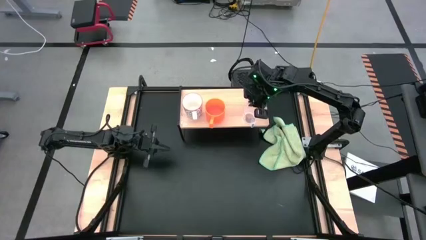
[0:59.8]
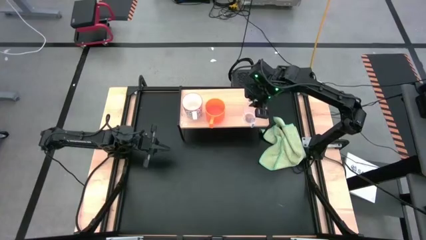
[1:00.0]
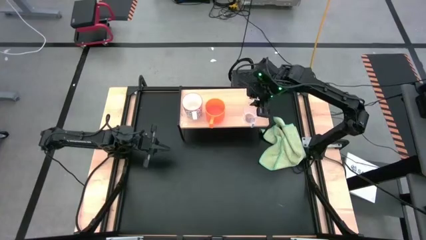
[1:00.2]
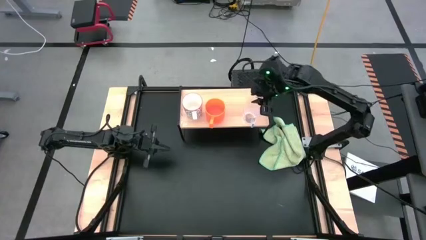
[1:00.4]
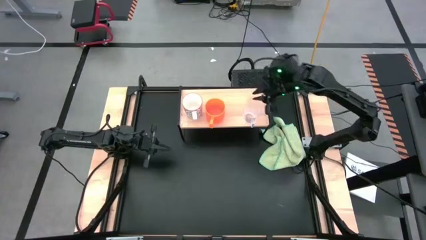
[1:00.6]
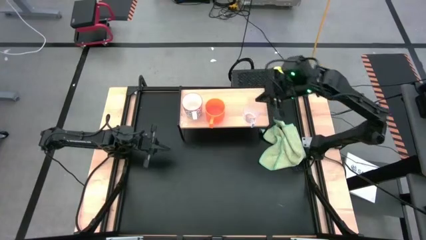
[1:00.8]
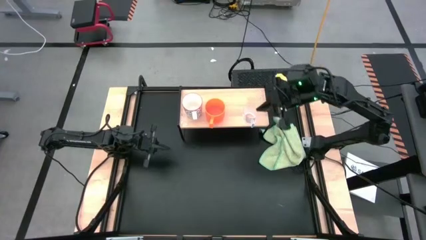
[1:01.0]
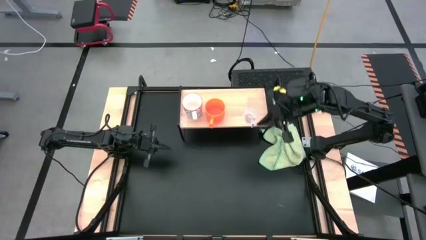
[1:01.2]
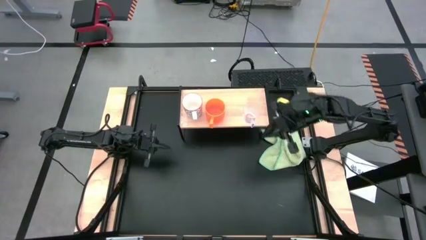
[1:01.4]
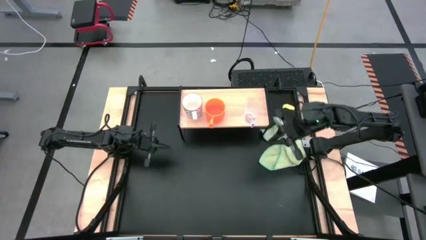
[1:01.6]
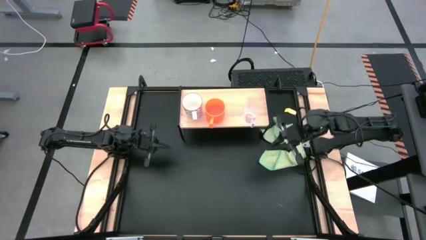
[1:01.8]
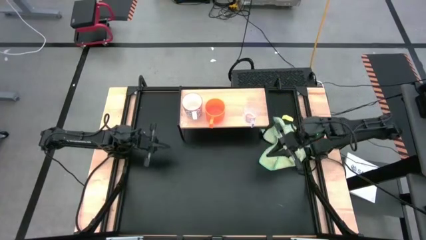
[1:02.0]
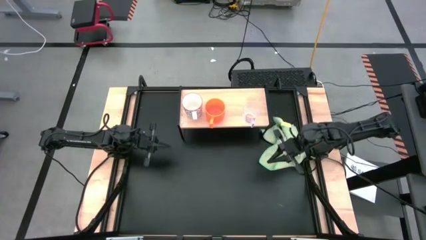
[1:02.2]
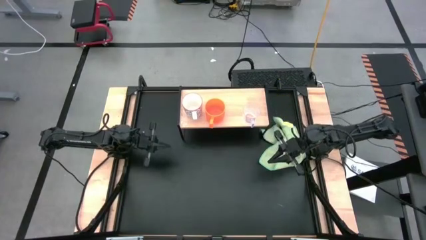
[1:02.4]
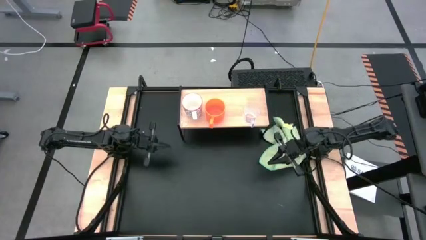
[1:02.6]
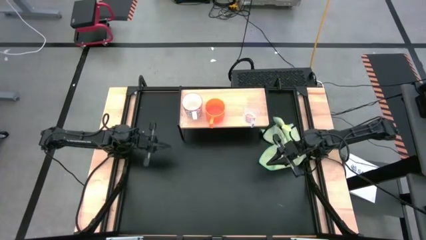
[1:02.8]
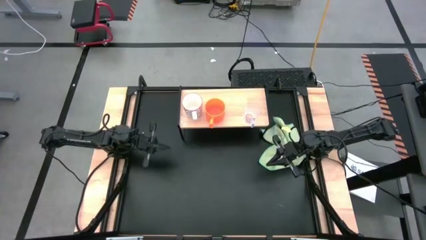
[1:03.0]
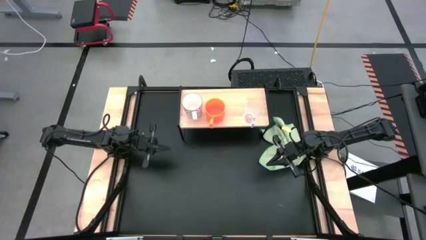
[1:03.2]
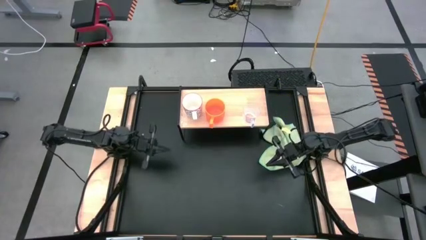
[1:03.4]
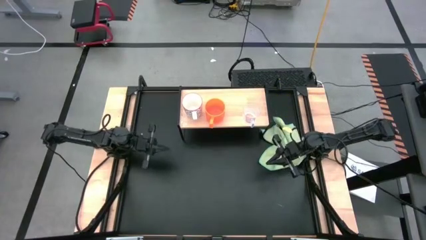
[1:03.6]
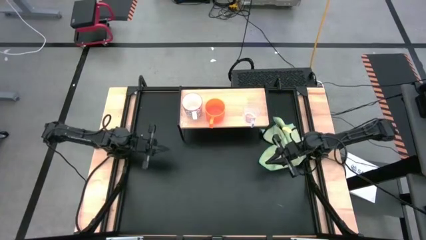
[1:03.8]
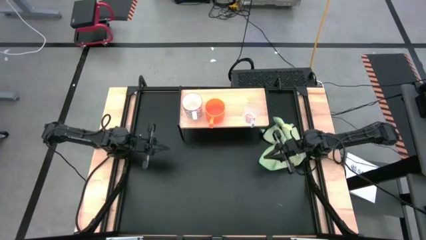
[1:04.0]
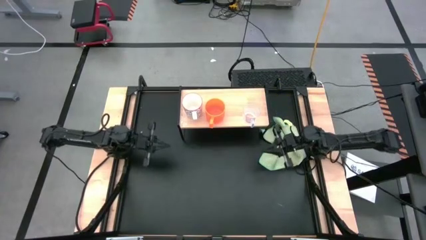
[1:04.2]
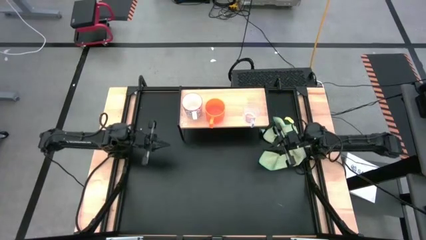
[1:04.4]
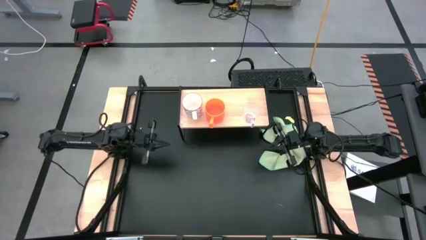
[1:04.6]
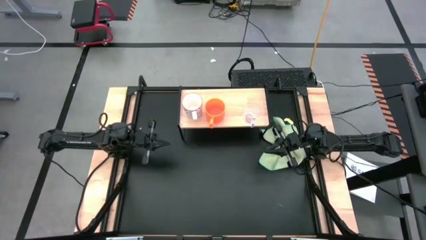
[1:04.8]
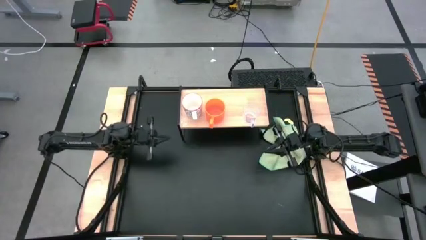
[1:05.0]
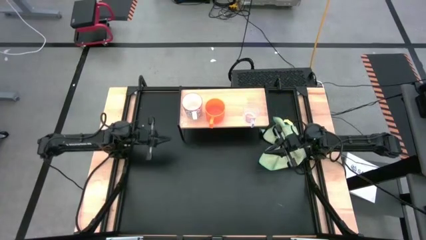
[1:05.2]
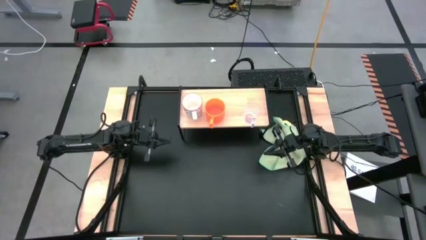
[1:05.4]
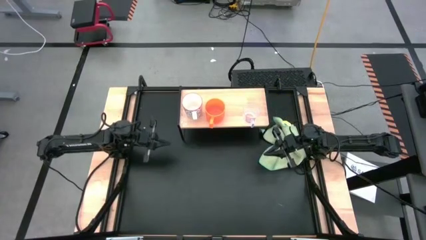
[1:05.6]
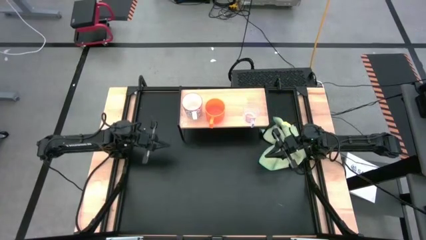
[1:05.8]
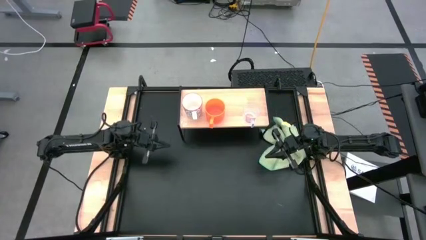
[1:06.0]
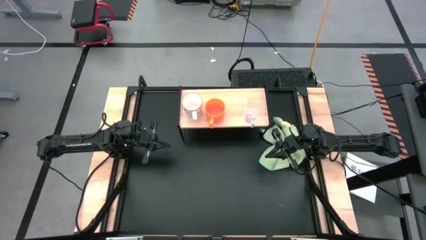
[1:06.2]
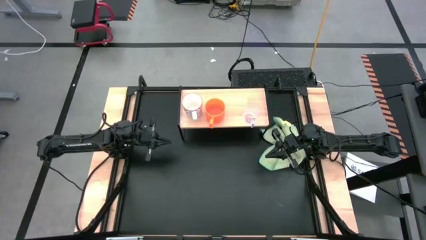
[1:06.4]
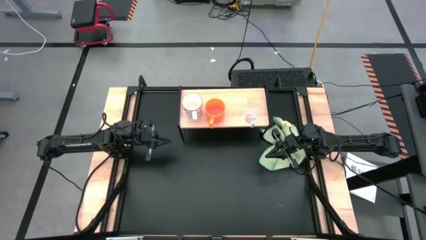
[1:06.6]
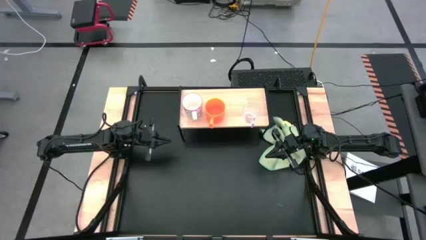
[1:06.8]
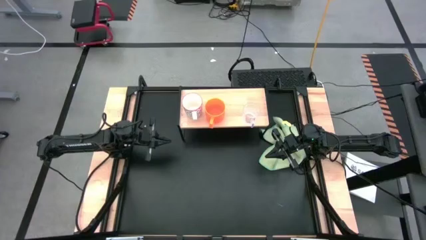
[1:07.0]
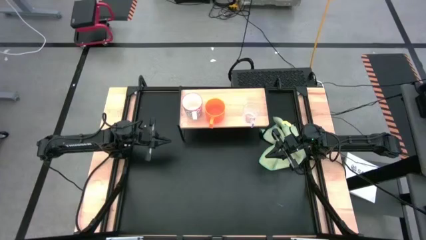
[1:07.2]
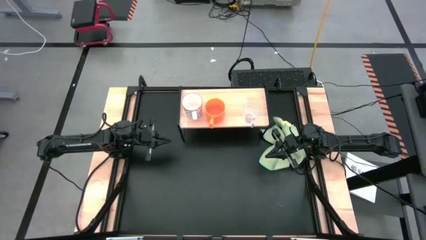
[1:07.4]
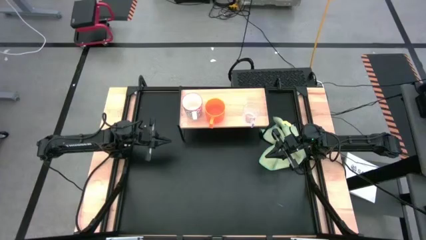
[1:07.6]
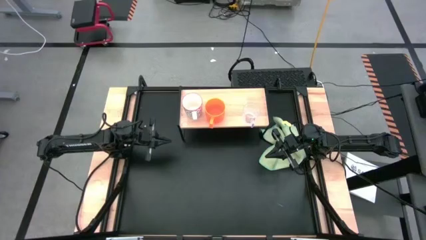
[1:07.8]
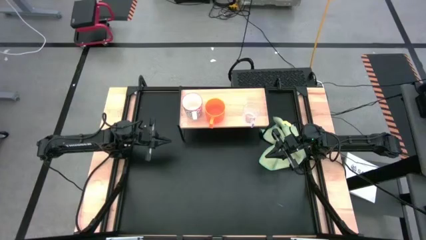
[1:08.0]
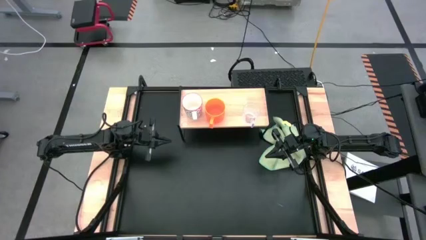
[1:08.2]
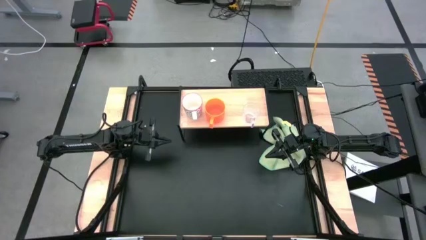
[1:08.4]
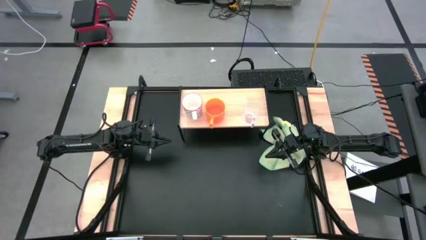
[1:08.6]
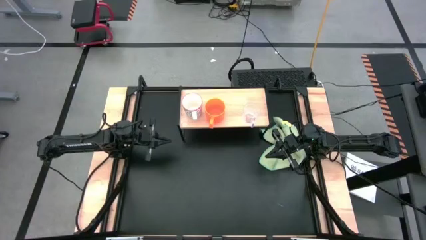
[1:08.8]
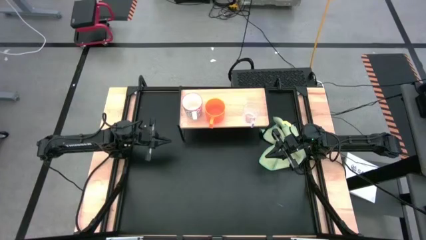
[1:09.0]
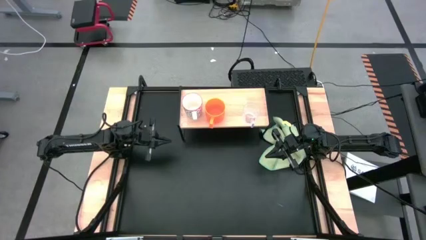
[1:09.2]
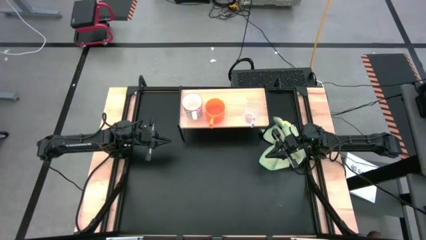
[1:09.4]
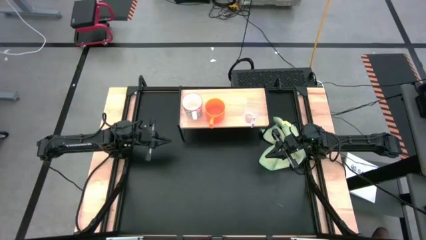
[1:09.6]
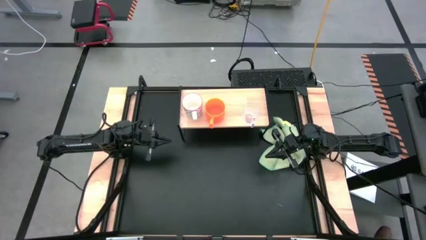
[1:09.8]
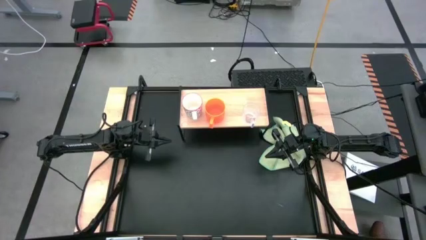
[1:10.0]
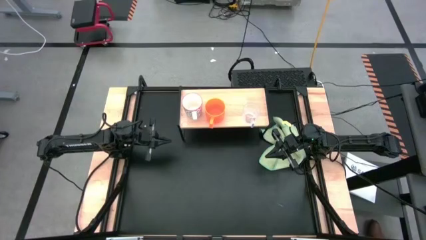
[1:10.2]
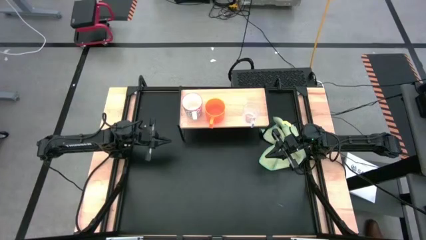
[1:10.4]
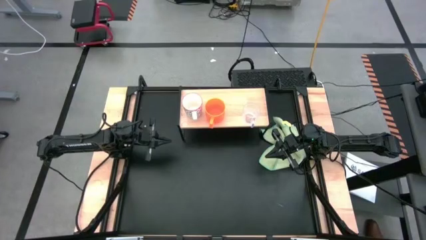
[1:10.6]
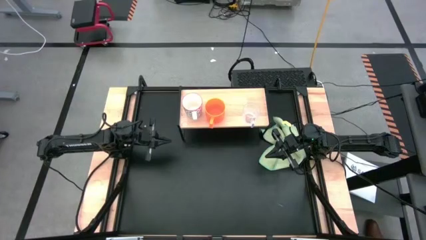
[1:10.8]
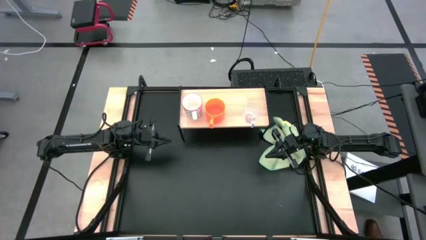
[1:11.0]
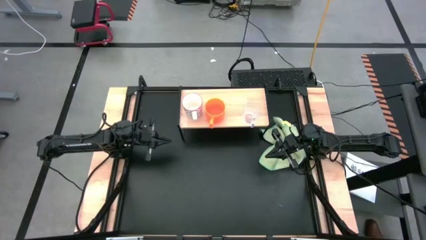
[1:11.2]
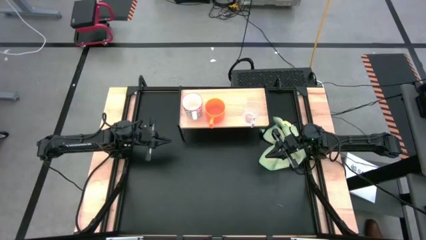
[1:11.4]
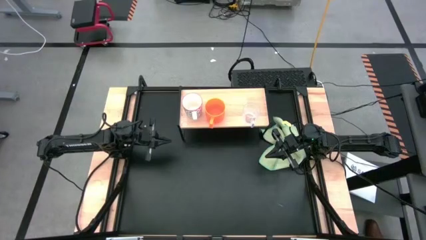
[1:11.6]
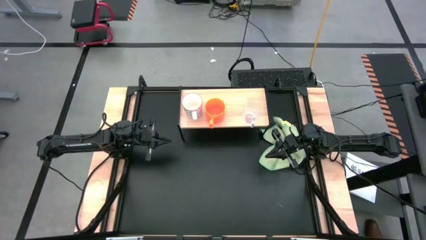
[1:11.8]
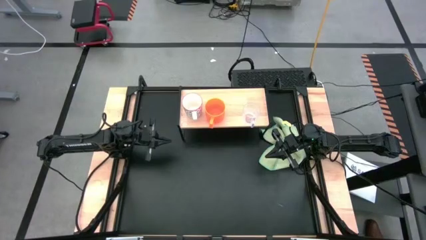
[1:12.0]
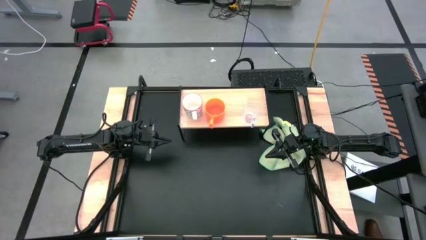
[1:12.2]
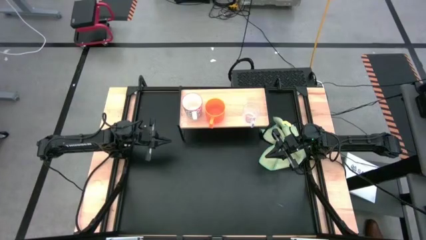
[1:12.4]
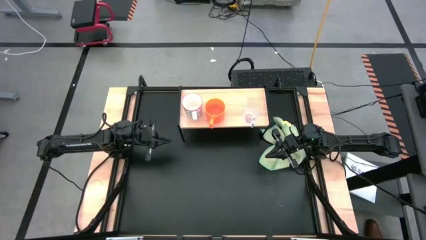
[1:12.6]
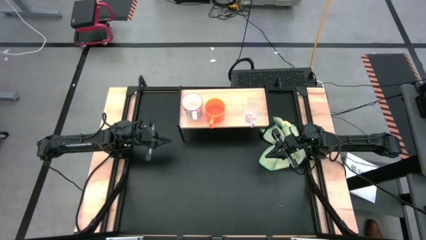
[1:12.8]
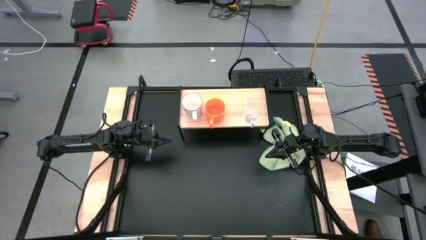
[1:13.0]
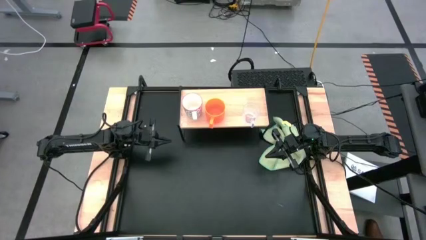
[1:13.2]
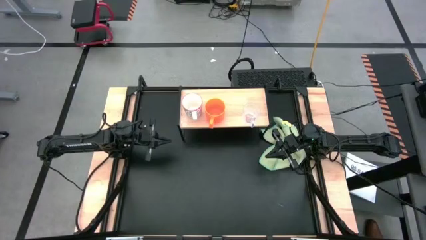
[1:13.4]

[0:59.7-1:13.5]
Task: Stack small to large cups/mugs on shelf
Return to Home Position

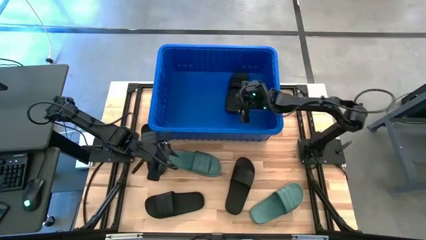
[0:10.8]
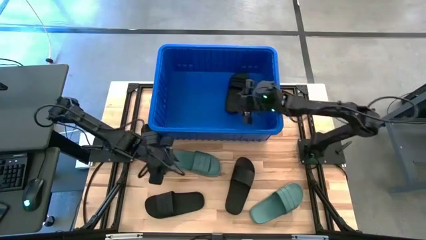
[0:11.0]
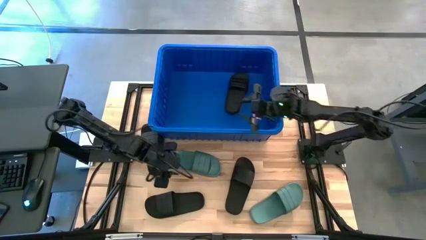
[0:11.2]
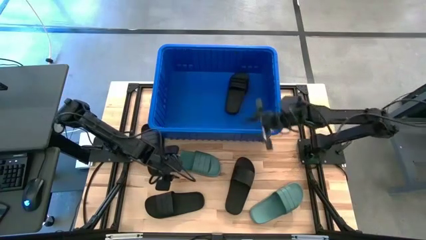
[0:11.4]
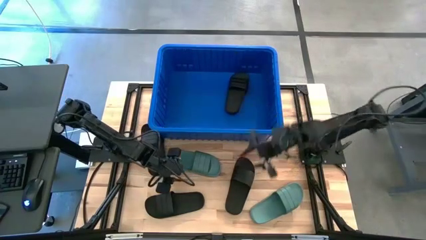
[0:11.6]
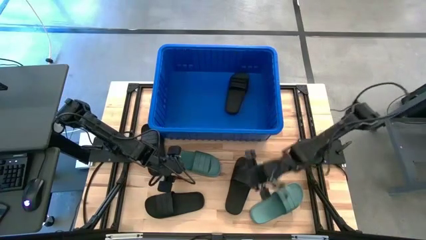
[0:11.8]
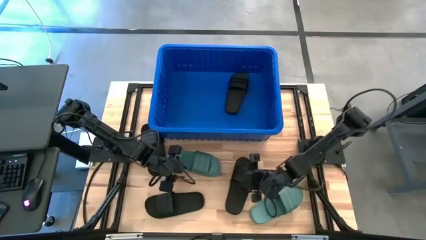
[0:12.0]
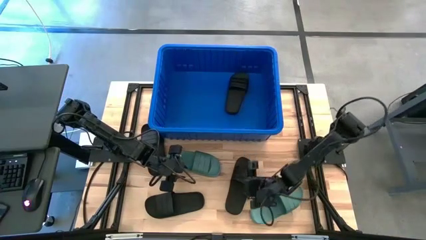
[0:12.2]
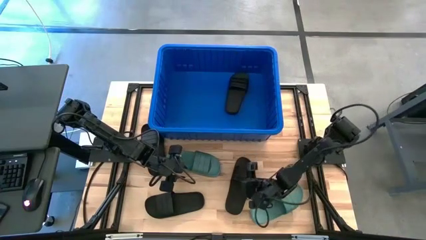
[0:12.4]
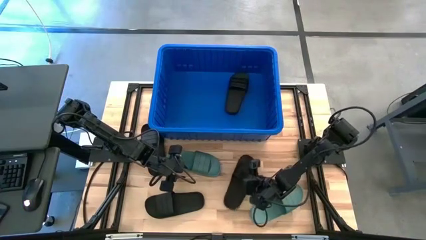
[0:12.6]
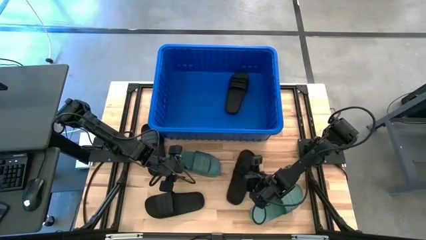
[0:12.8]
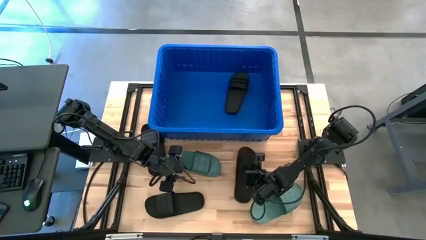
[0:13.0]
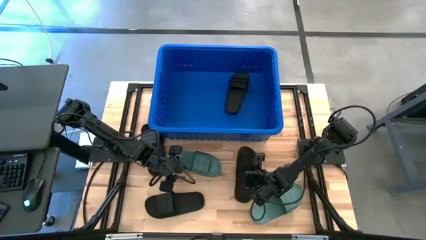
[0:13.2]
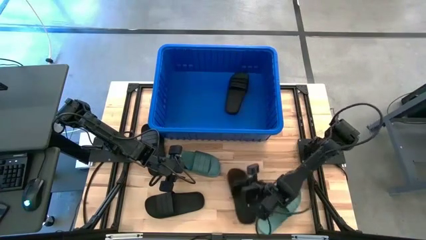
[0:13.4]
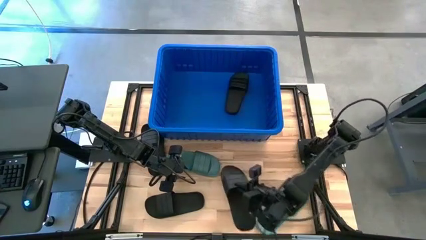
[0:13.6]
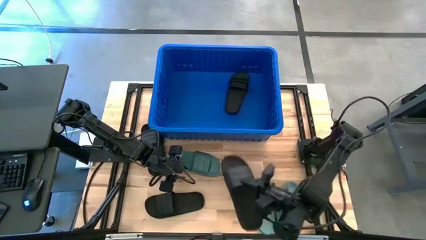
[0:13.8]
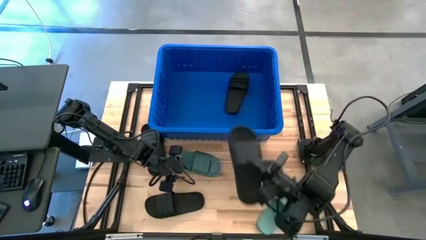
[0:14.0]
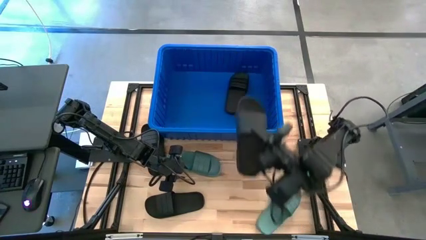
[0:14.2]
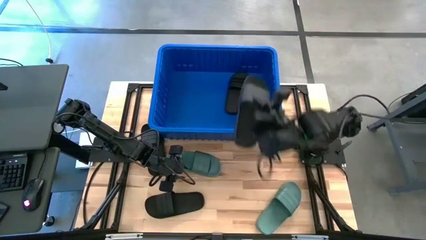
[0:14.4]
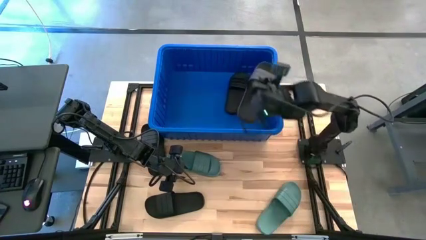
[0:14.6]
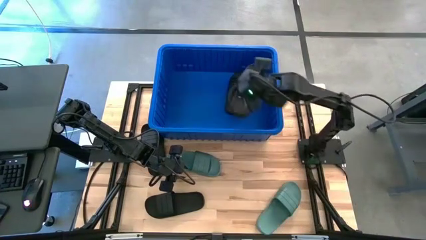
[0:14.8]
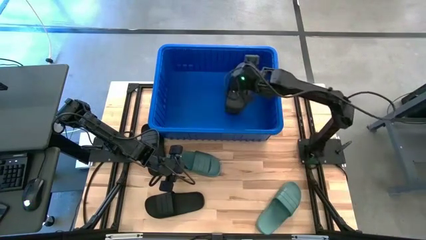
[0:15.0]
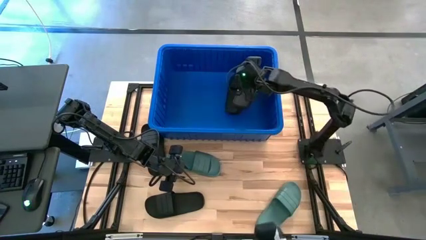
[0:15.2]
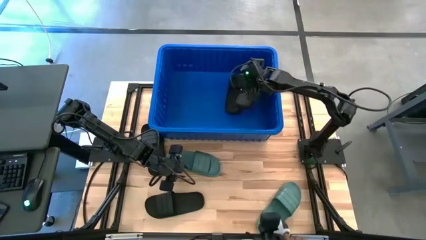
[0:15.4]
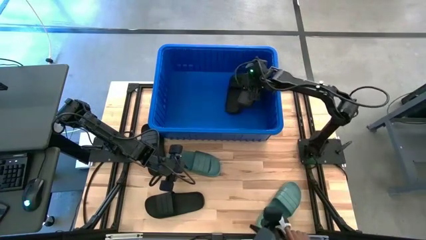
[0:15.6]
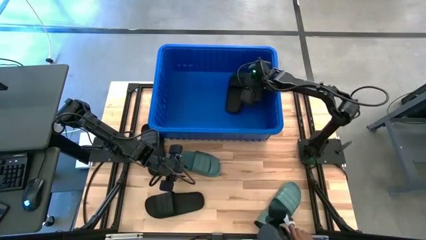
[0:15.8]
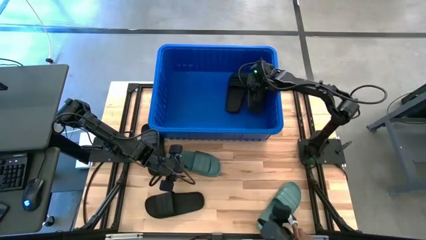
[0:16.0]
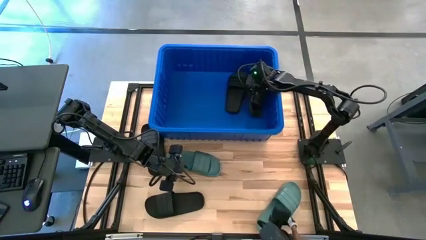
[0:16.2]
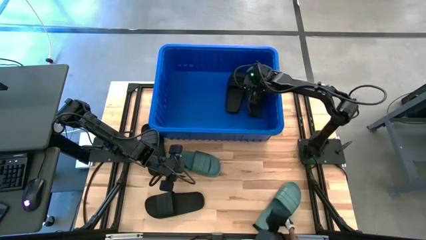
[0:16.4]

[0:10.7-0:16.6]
Task: Pick and place slides into bin
Put the black slipper into the blue bin
